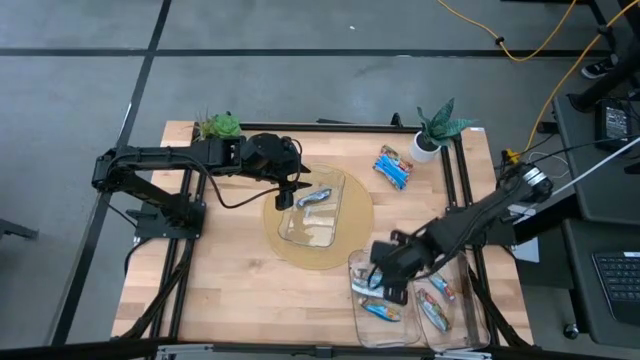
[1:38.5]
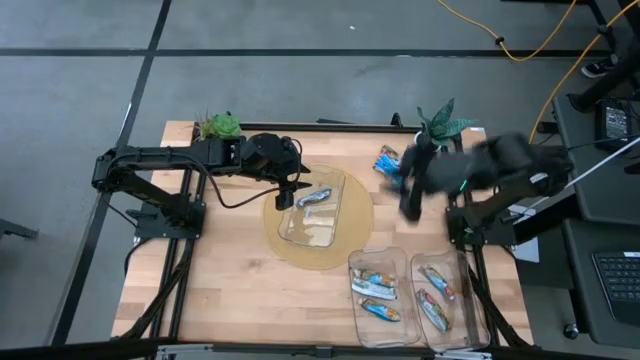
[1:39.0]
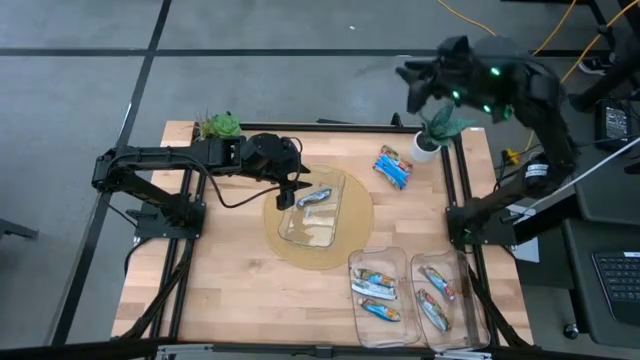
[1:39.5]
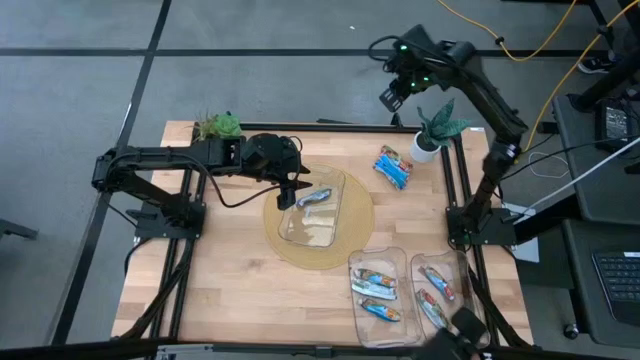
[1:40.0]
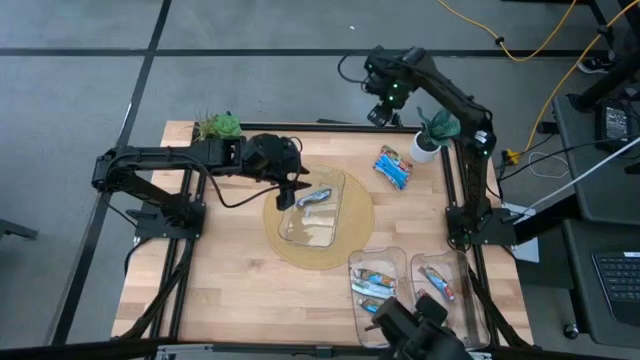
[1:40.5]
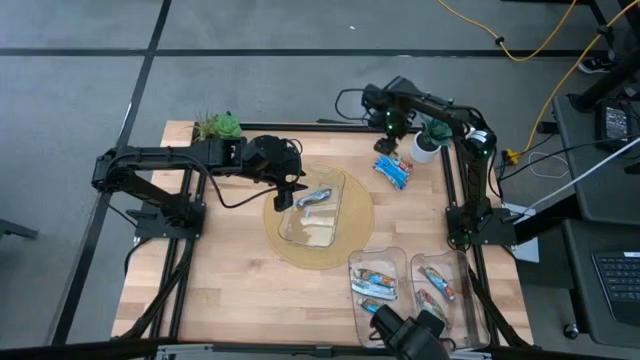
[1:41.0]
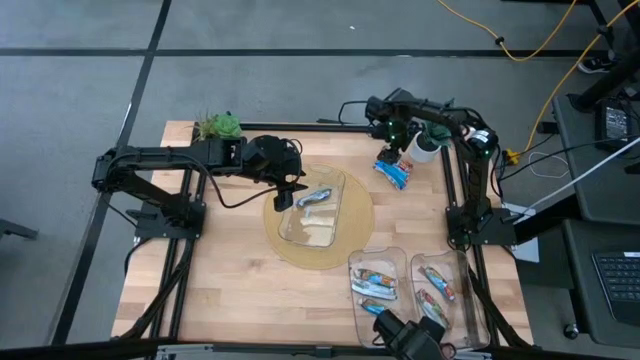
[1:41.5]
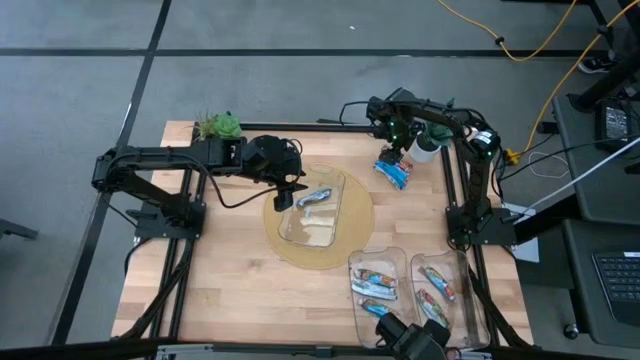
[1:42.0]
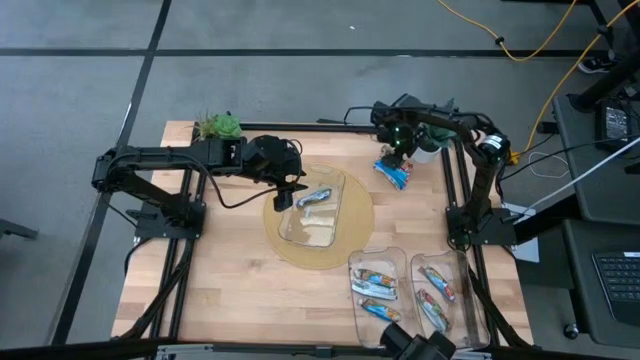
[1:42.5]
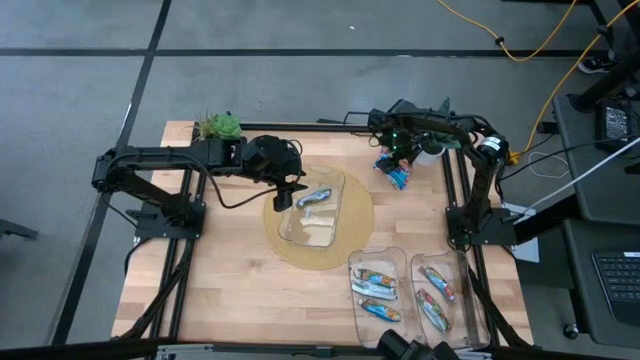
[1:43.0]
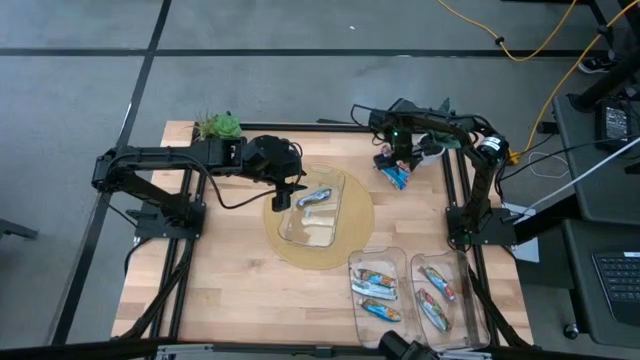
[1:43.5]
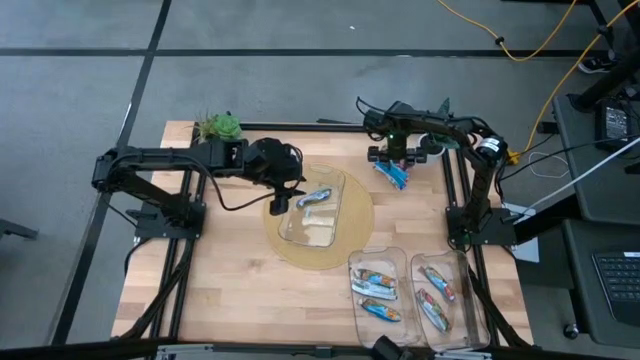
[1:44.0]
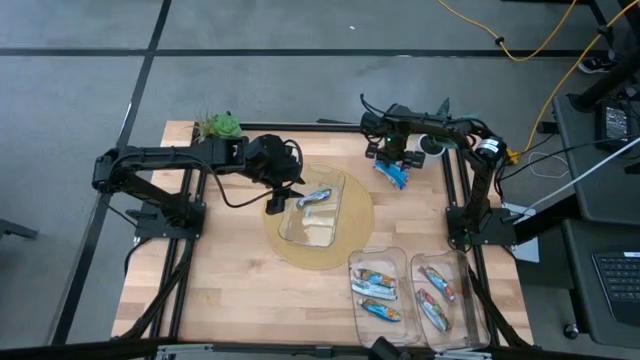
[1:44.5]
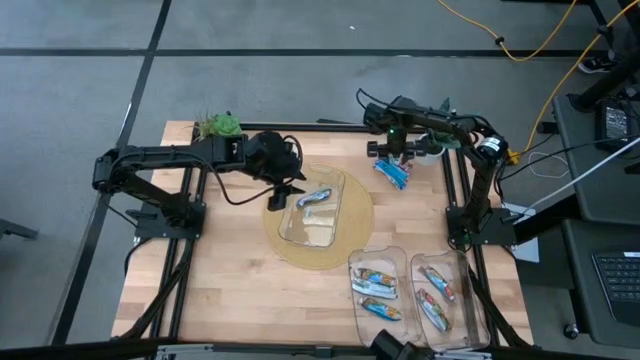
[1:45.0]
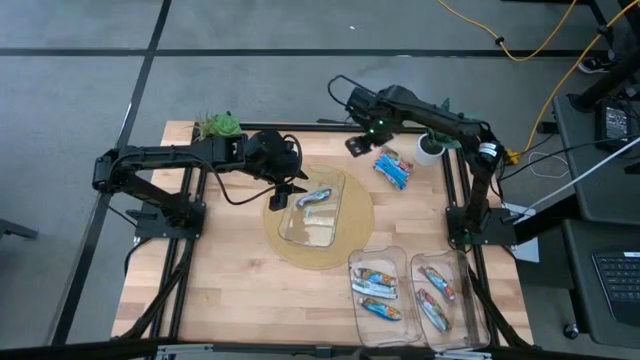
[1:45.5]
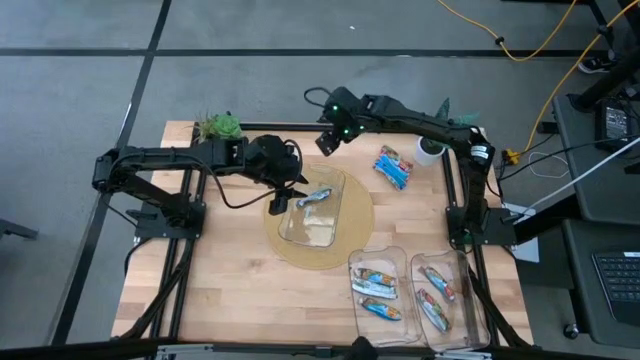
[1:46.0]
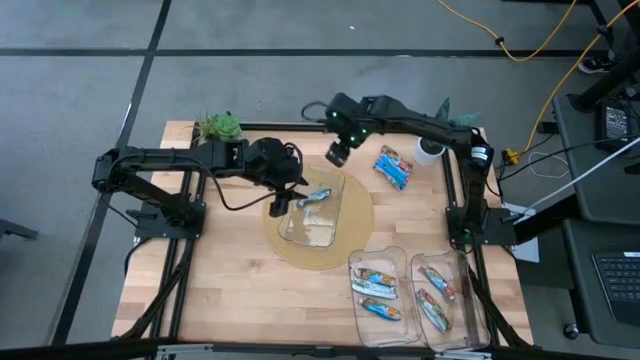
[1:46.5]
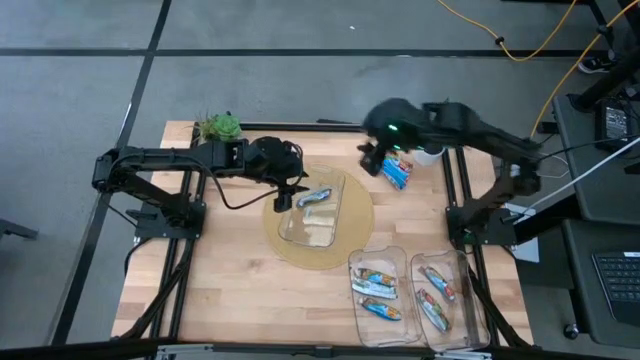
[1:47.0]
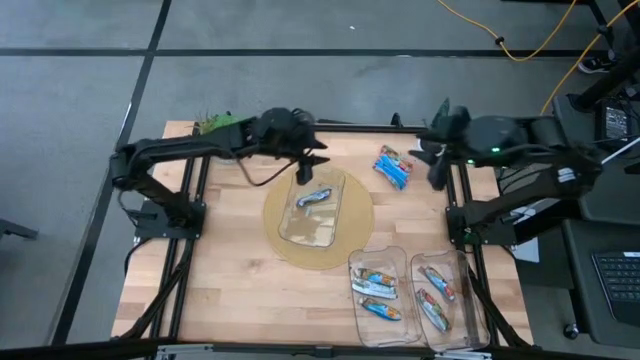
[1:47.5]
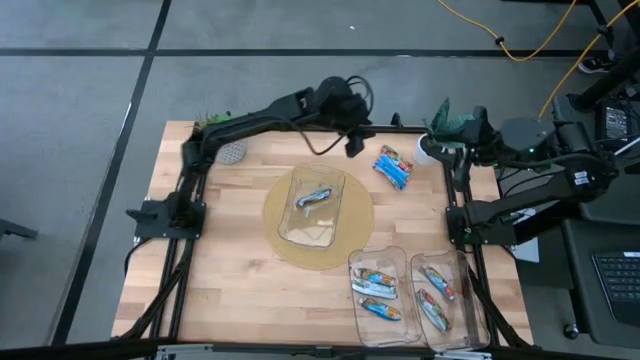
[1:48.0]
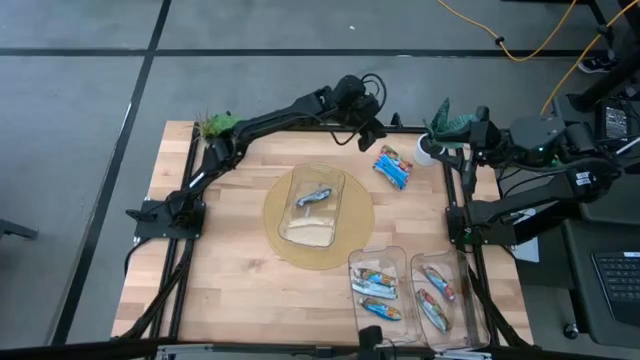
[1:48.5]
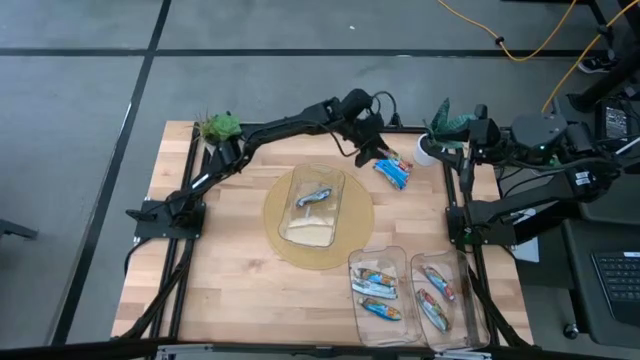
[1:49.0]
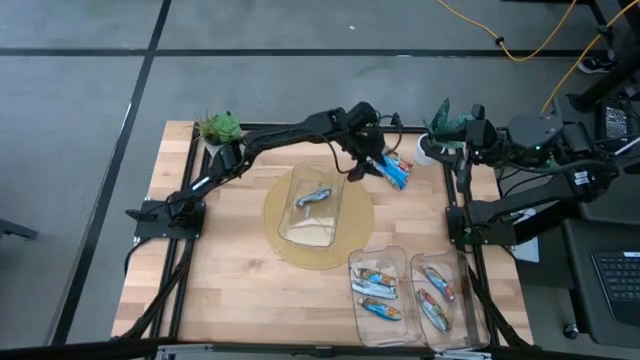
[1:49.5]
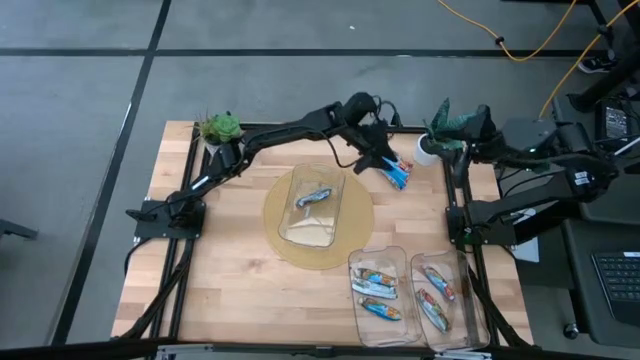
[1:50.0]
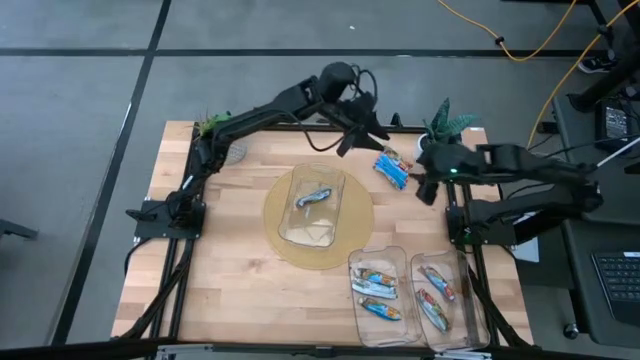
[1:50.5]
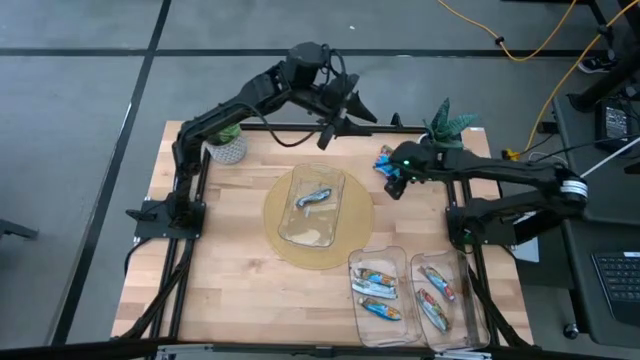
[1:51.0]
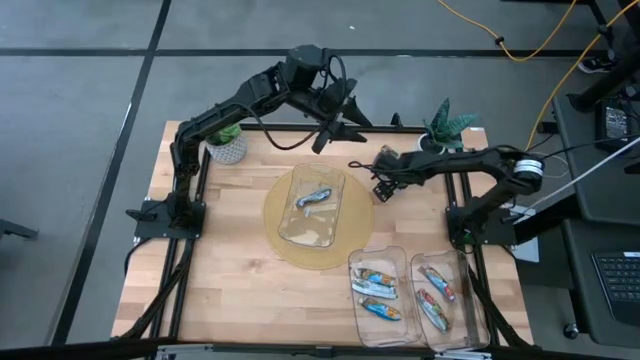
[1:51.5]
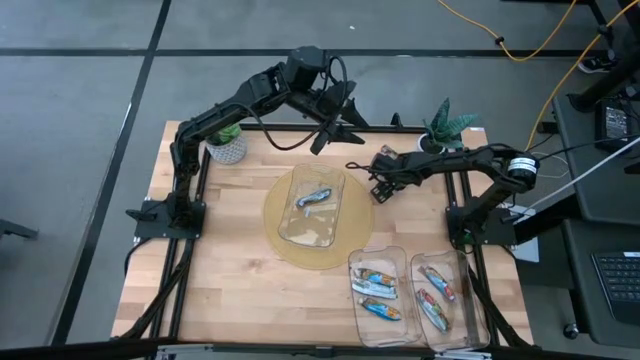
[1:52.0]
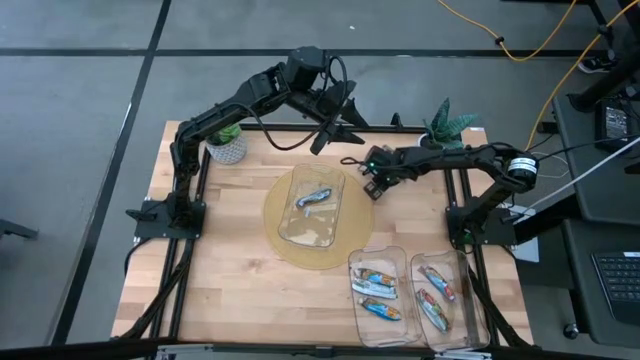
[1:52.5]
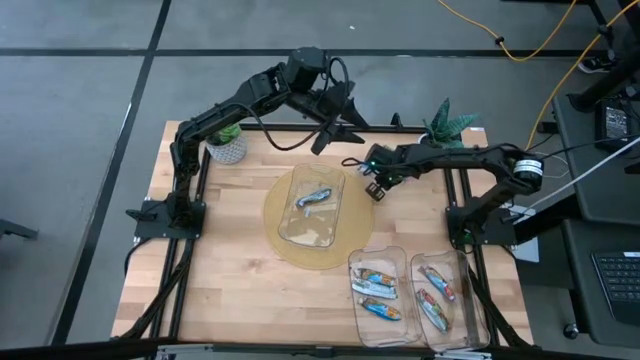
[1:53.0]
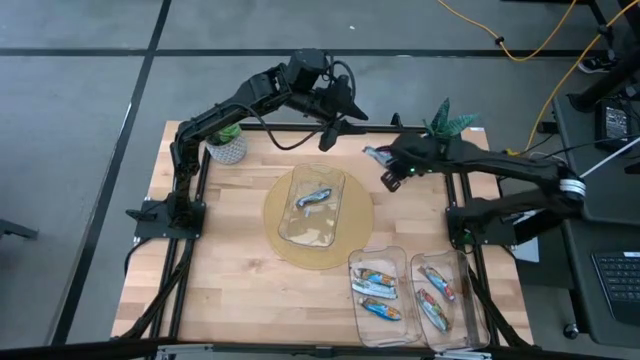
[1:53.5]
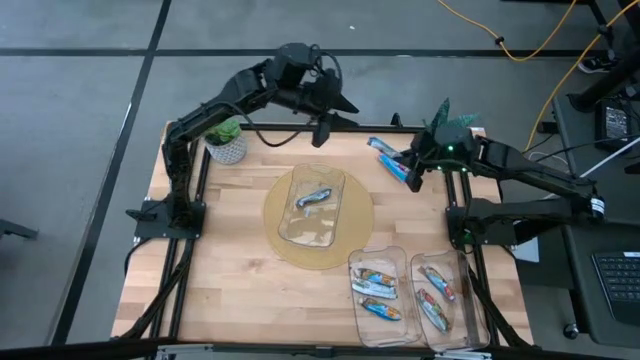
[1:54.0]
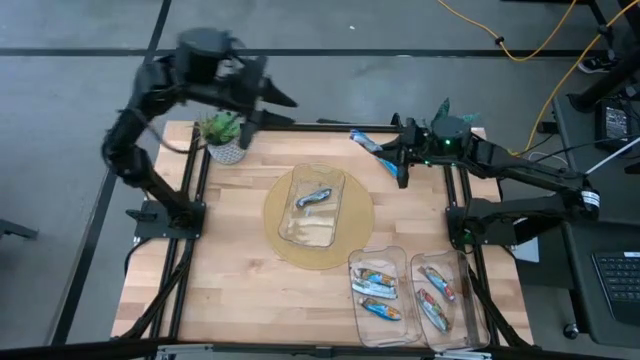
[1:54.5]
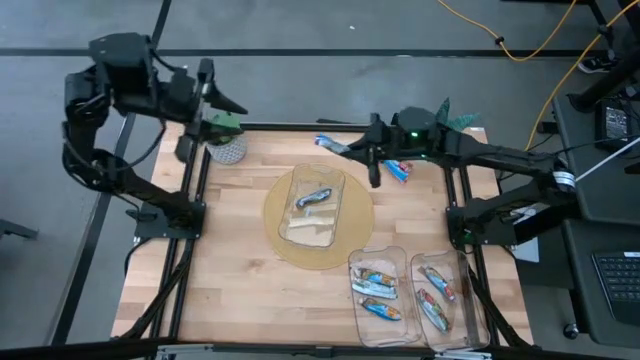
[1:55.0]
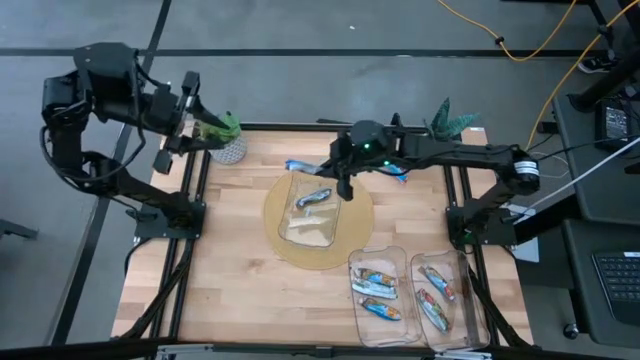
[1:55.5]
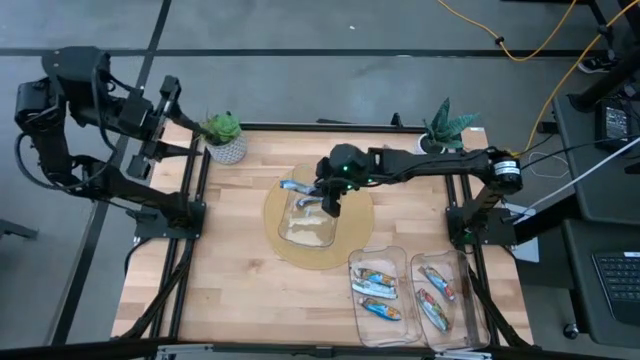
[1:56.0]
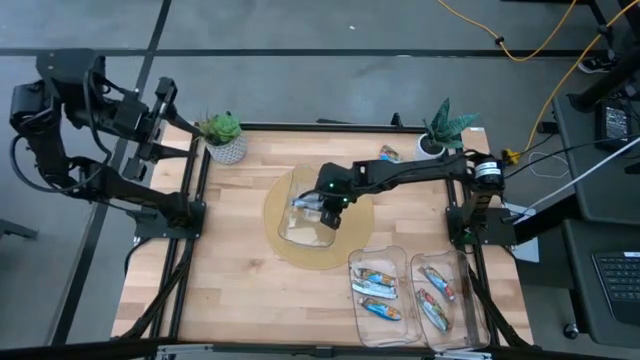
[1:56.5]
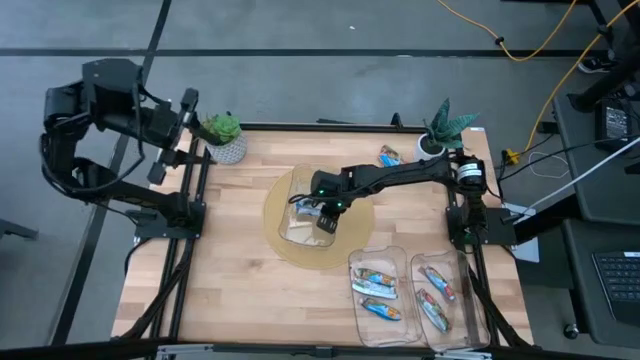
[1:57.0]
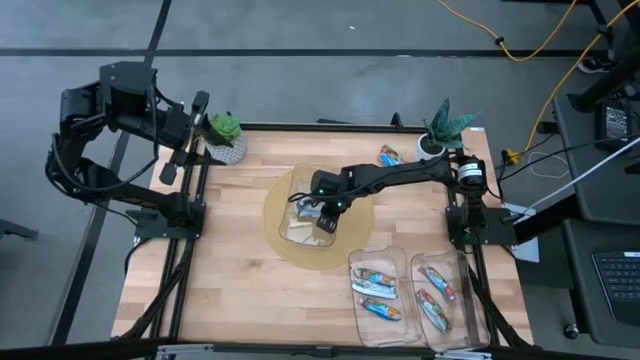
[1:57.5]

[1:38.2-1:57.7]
Task: Pick and place Granola Bars by type
Put the blue granola bar pack into the top transparent bin
